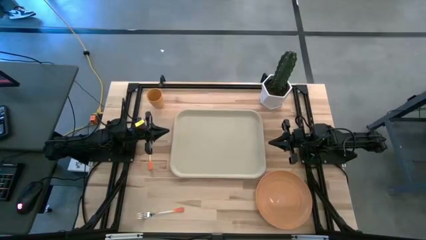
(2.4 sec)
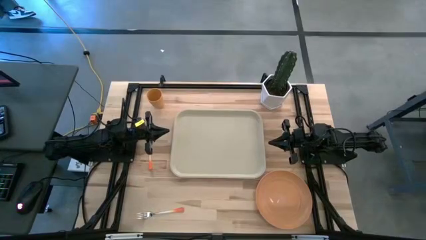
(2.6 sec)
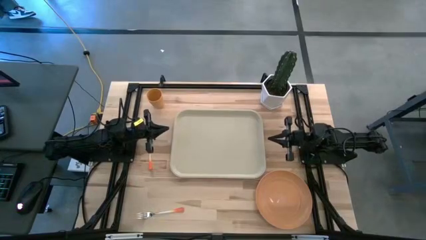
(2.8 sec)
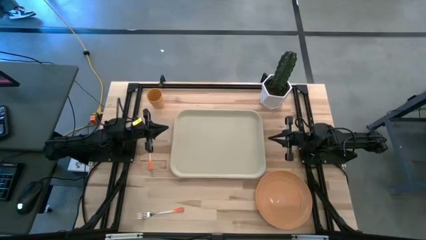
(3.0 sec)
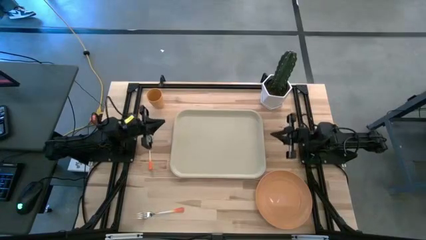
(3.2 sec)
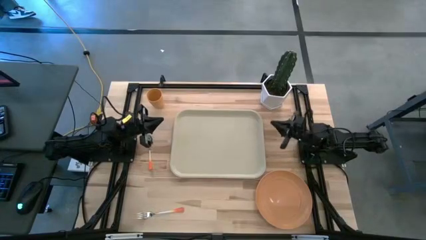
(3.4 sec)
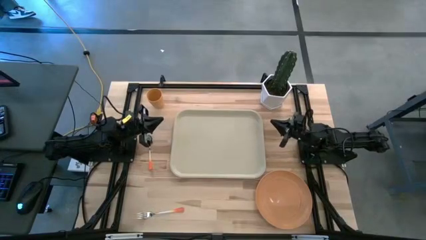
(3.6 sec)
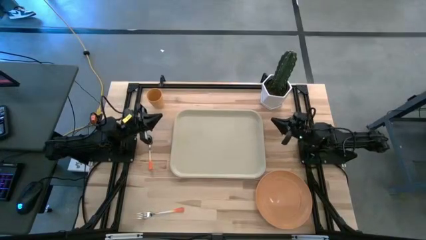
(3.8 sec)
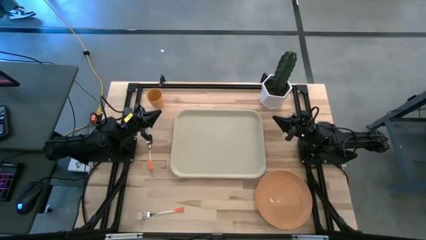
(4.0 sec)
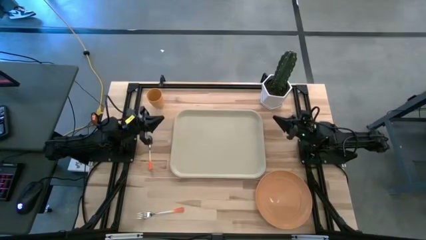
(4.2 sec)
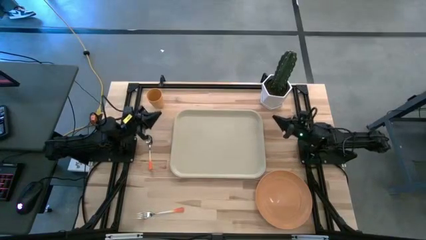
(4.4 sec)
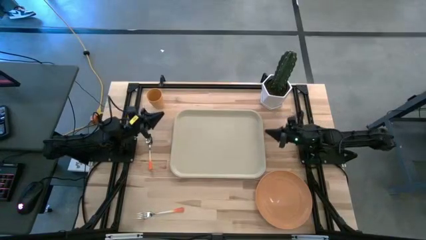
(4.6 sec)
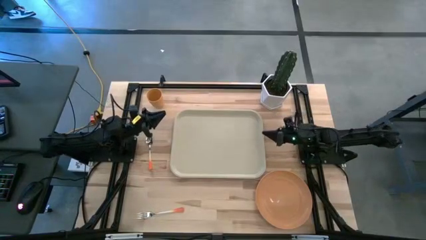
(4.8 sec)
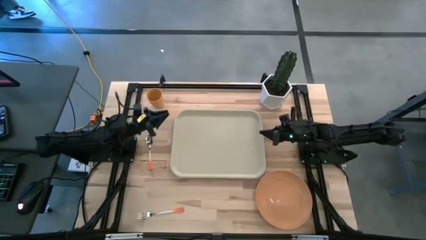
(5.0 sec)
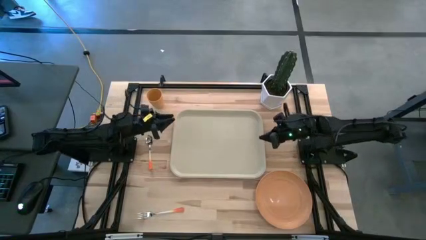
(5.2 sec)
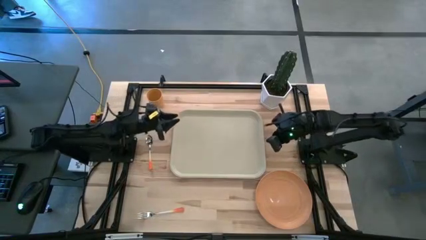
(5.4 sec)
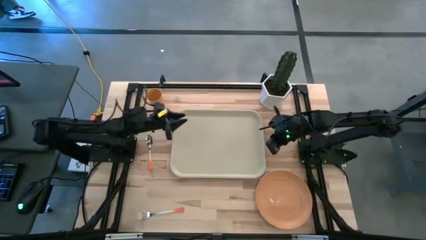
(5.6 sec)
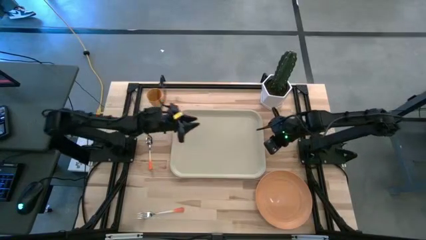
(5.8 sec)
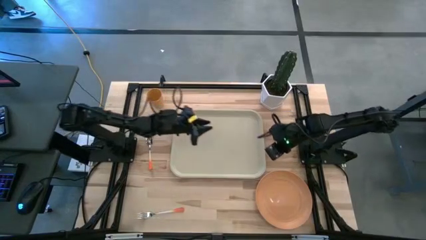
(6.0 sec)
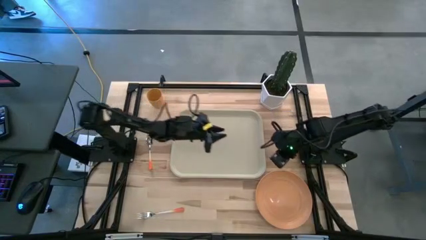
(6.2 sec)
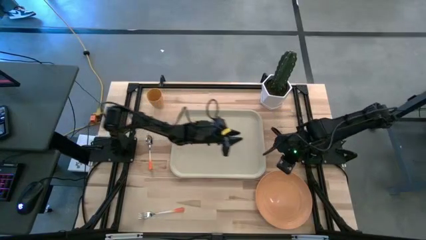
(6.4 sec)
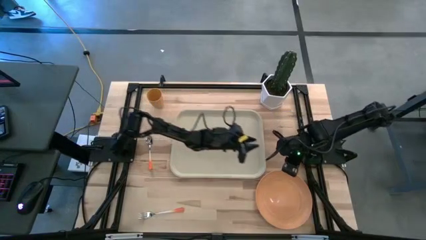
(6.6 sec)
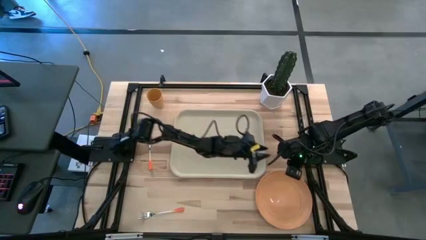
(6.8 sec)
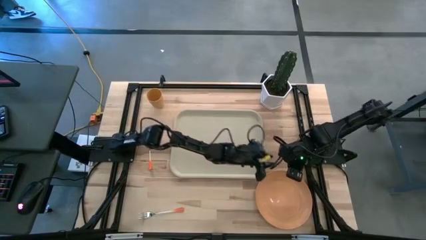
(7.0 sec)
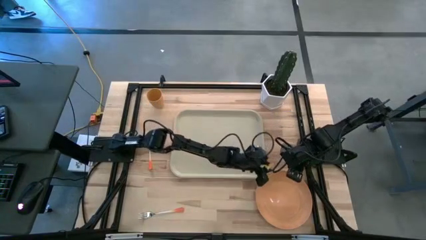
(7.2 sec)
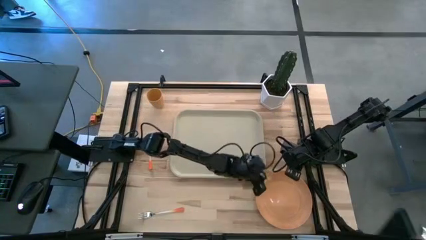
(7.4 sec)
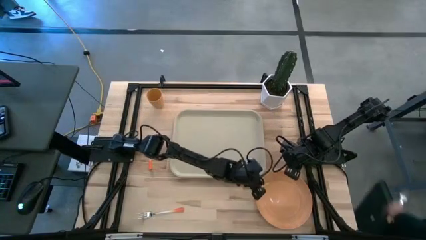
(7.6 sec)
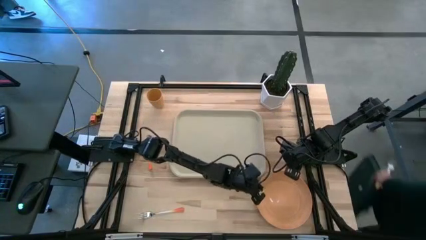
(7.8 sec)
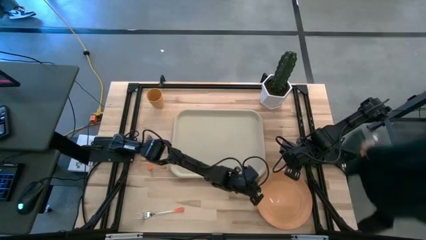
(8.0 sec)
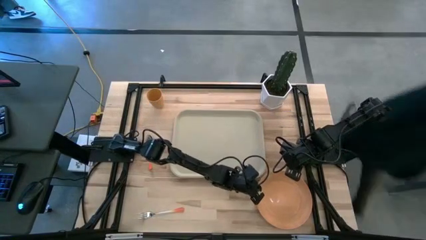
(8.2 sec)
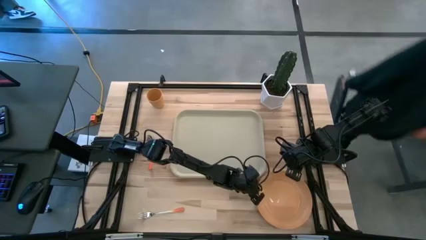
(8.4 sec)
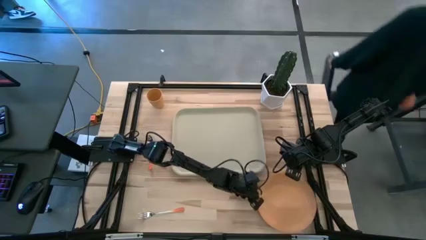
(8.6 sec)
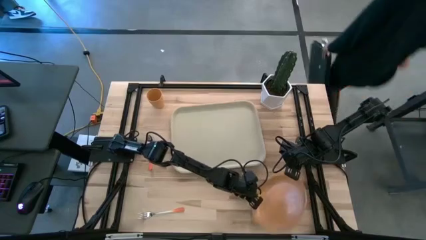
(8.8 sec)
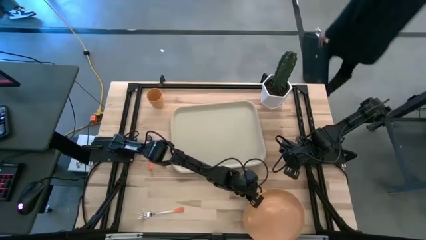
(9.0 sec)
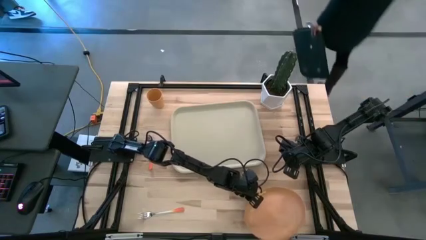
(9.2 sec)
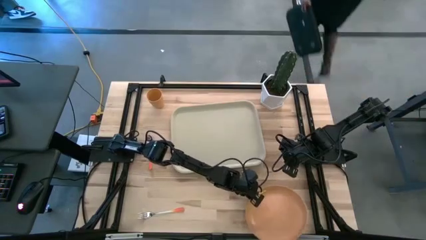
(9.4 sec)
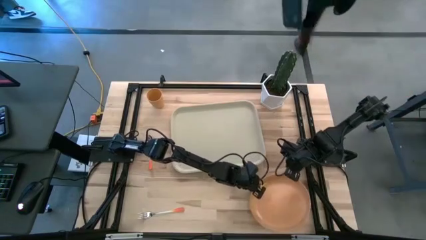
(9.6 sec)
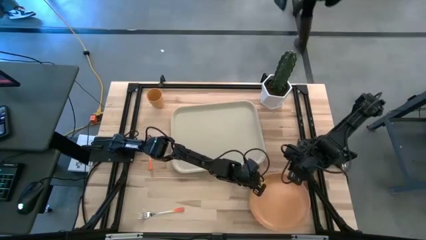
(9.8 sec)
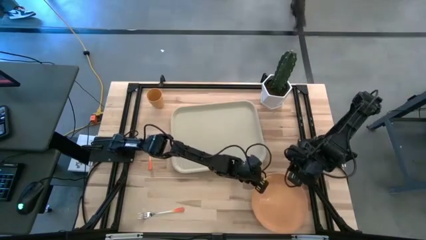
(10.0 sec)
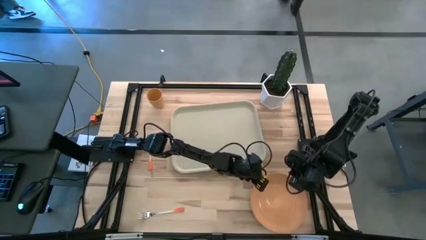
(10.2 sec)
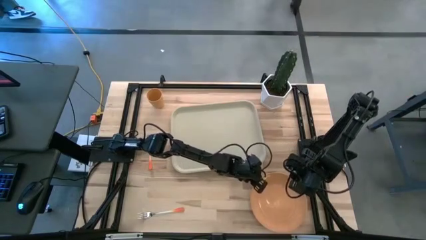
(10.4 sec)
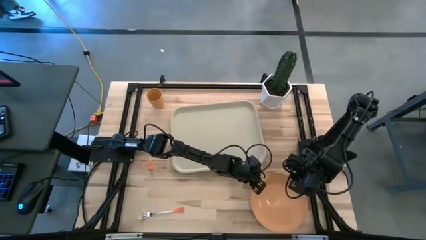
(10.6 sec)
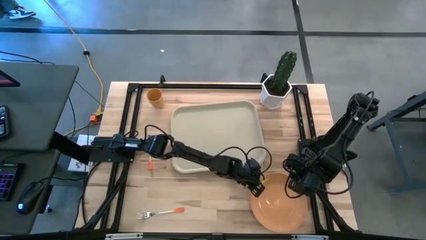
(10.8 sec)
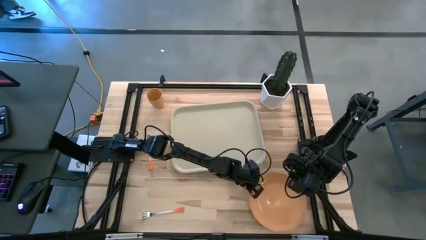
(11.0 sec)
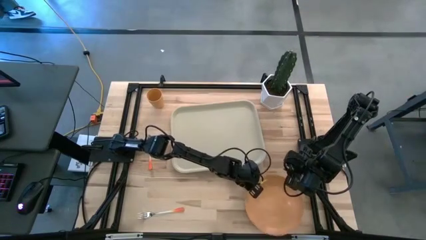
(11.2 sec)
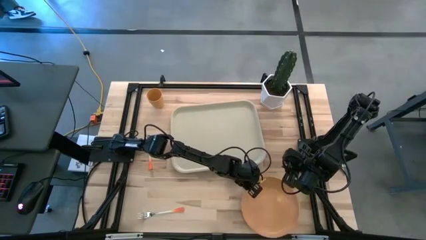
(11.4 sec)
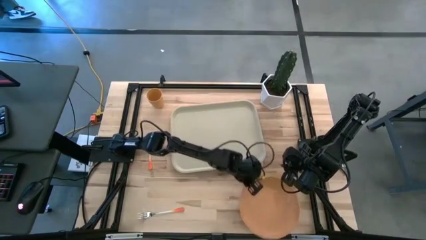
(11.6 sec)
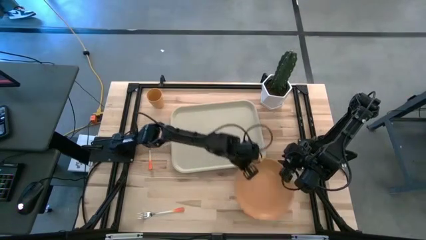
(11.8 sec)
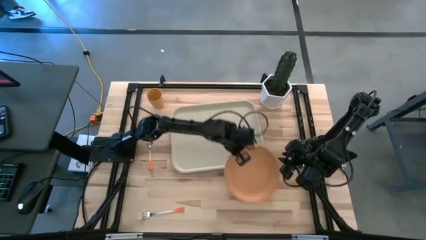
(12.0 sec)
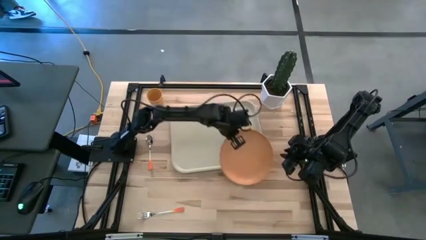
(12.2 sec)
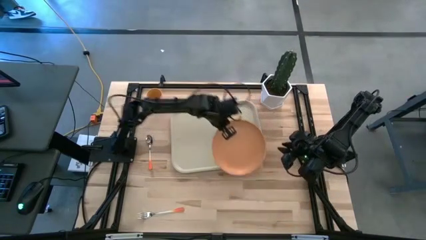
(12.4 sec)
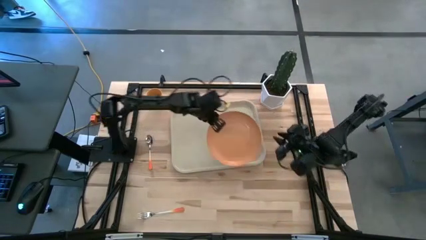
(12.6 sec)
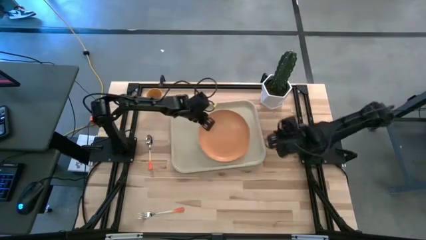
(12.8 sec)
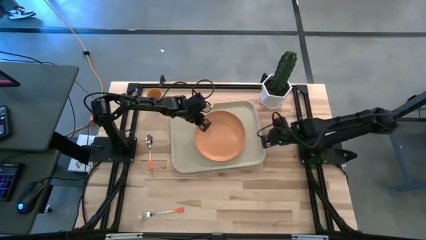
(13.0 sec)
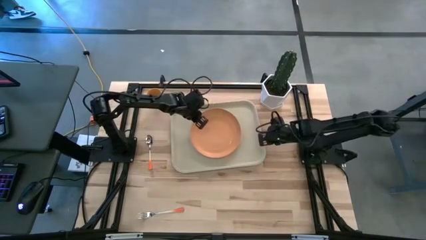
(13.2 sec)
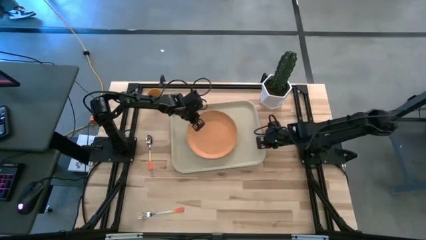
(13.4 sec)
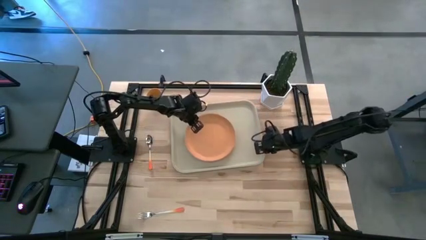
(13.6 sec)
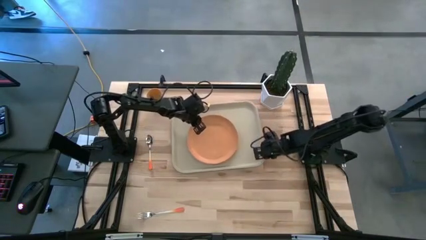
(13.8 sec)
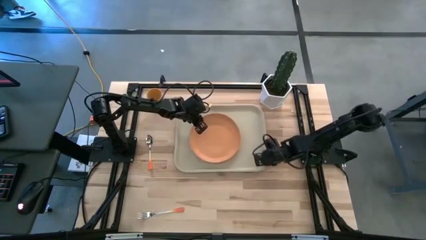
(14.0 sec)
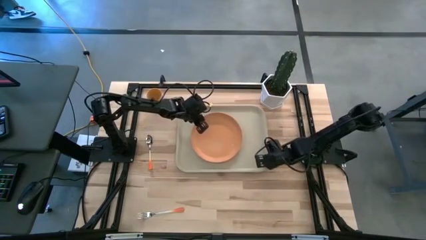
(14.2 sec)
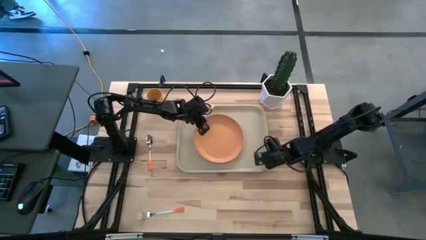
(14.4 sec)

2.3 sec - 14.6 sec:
Task: Pick and place plate/cup/fork/spoon on tray
Put the orange plate on the gray tray

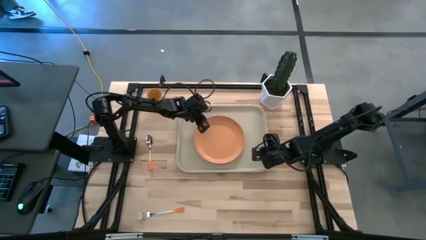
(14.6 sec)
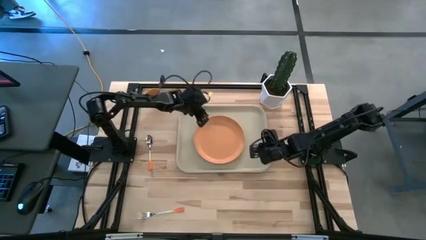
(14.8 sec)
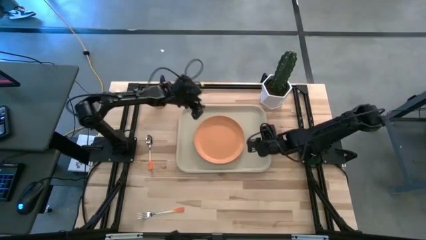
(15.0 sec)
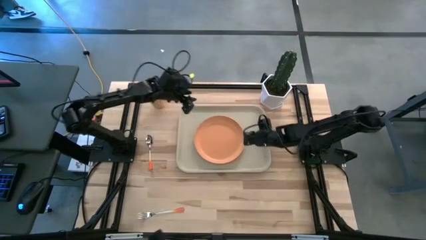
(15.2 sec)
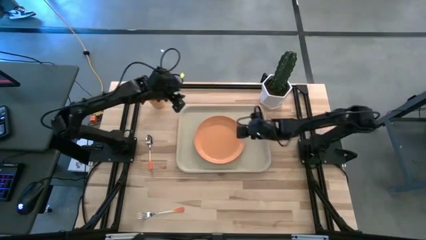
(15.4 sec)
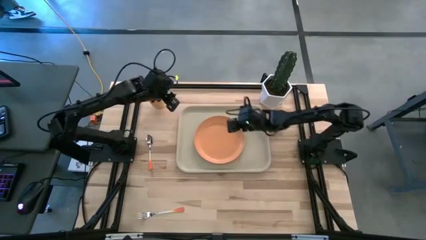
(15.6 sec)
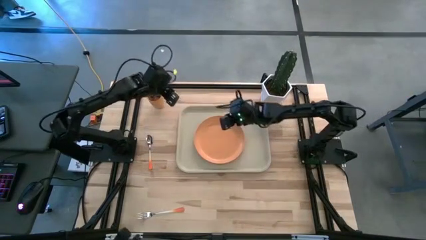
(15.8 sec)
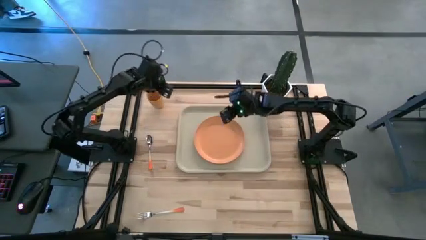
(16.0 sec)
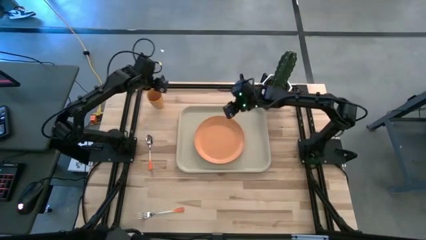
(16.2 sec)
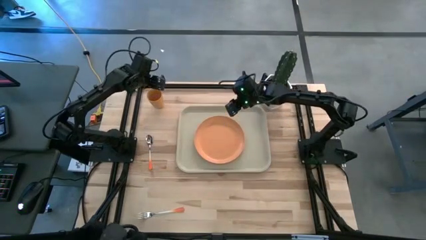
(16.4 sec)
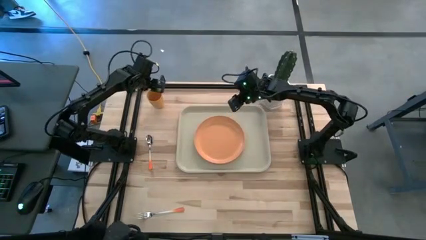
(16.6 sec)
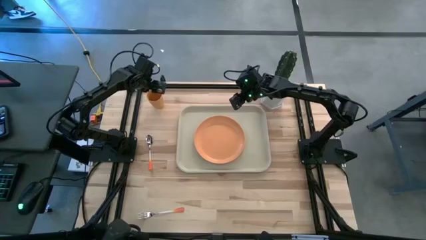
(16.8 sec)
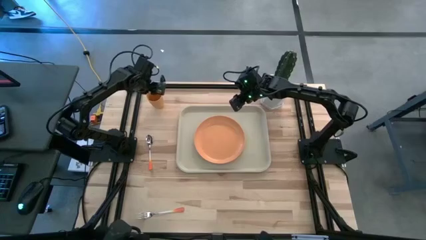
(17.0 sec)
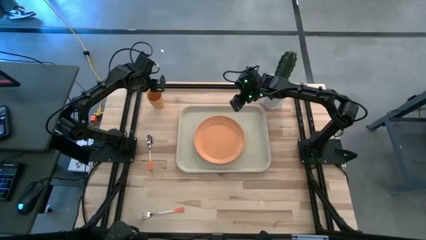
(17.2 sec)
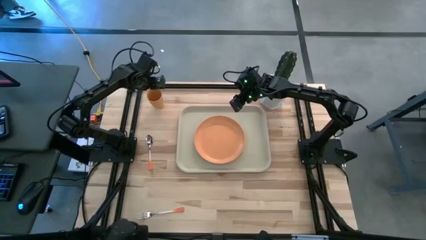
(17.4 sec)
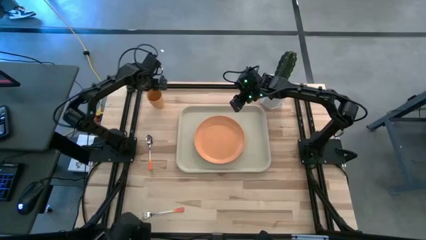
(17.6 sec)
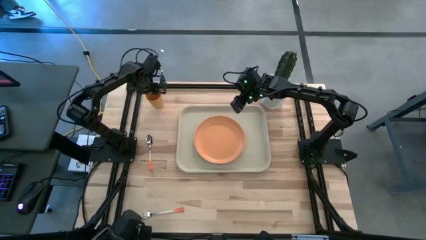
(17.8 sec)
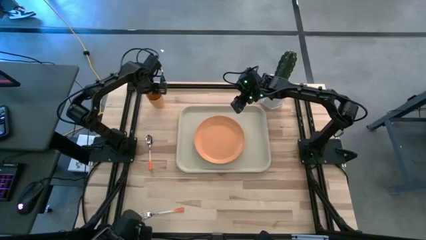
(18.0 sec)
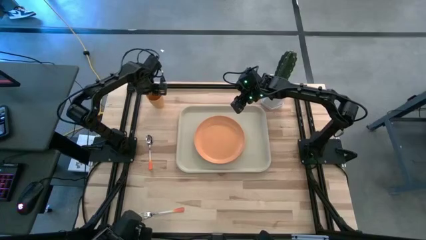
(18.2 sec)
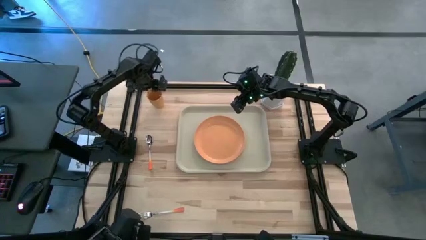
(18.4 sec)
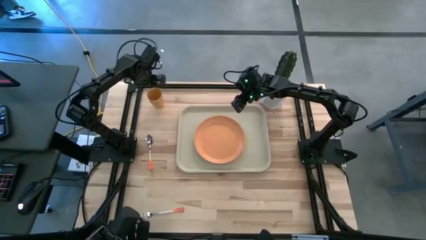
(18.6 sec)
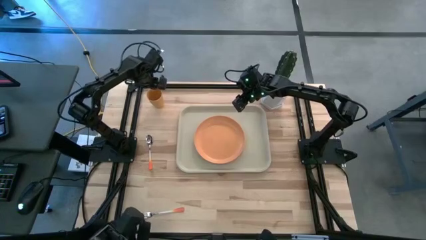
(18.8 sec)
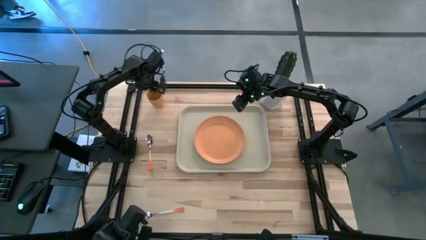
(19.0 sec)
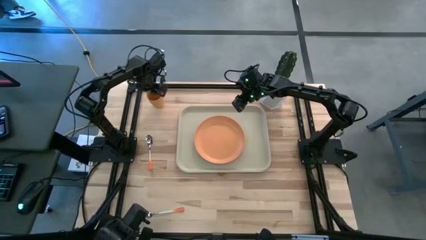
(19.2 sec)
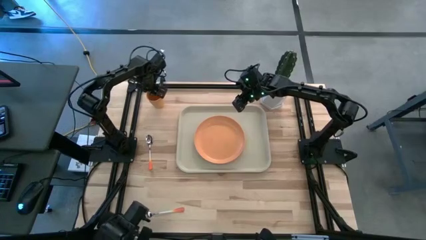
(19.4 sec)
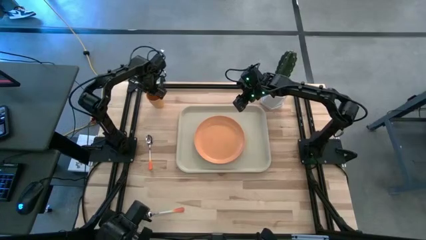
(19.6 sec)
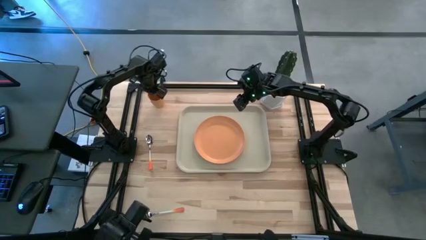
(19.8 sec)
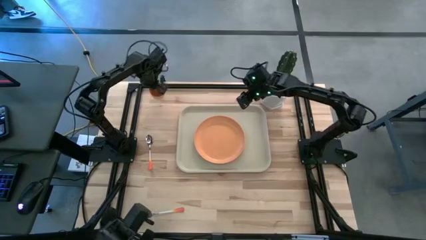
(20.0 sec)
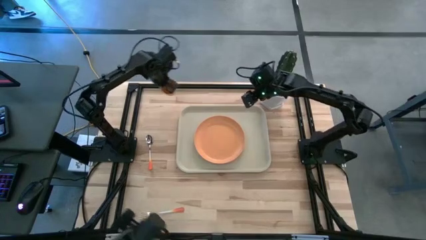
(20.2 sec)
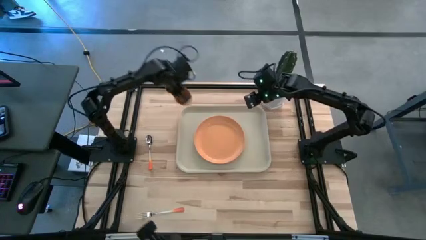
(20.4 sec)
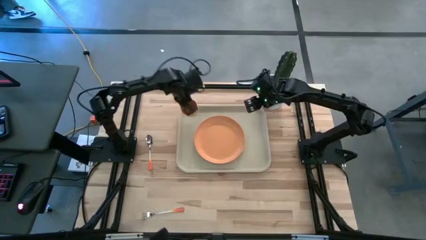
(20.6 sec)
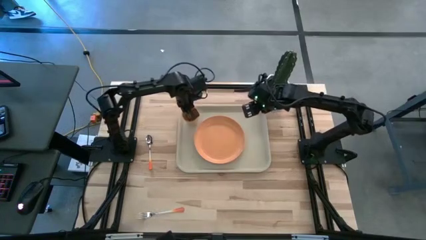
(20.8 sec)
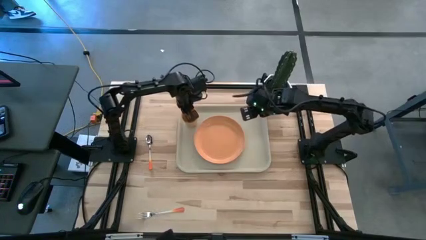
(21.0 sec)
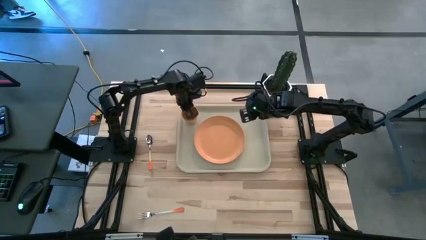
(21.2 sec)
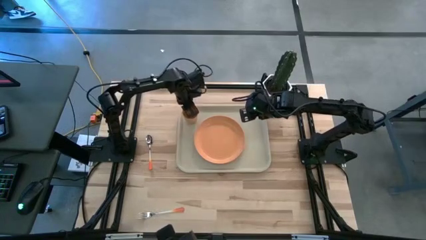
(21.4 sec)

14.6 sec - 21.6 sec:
Put the orange cup on the gray tray to the top left of the orange plate
